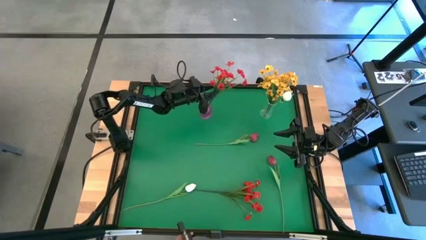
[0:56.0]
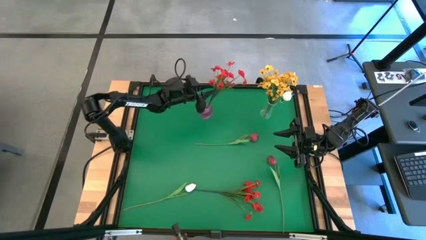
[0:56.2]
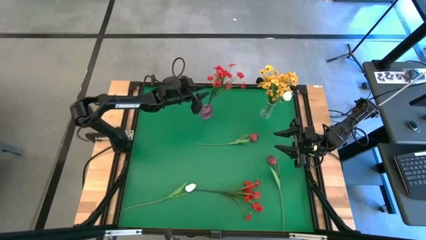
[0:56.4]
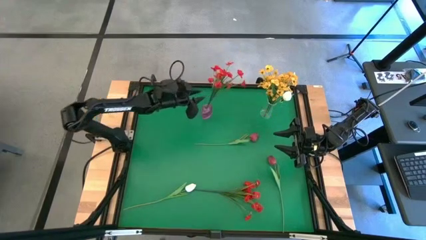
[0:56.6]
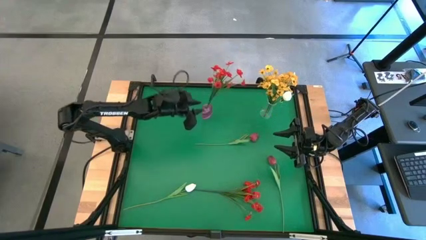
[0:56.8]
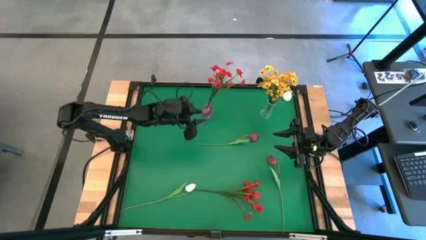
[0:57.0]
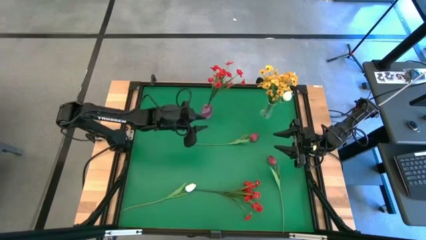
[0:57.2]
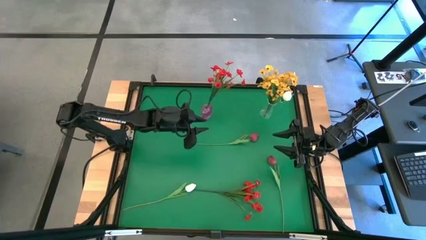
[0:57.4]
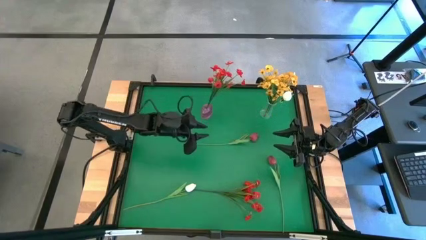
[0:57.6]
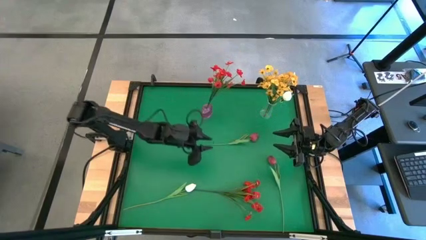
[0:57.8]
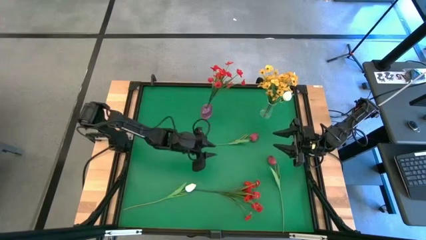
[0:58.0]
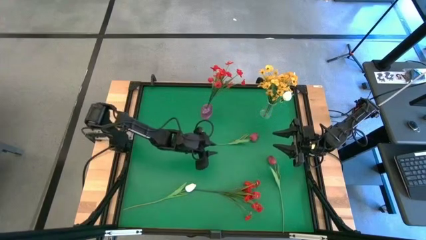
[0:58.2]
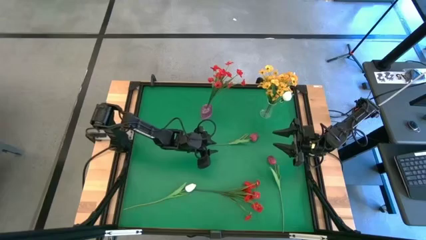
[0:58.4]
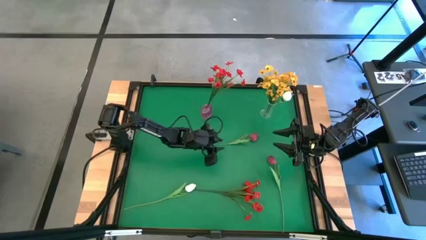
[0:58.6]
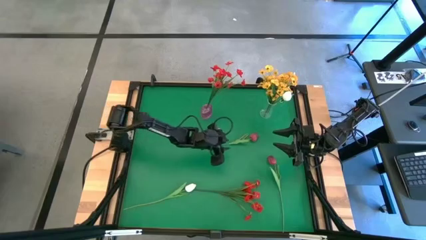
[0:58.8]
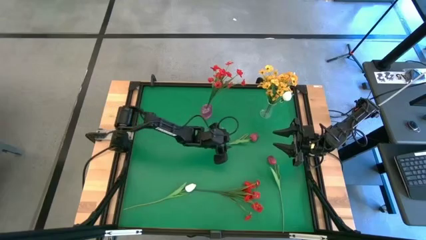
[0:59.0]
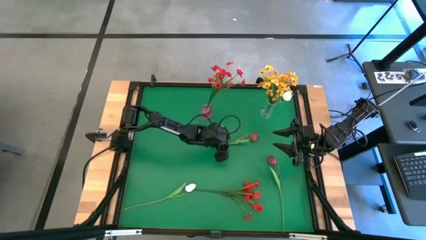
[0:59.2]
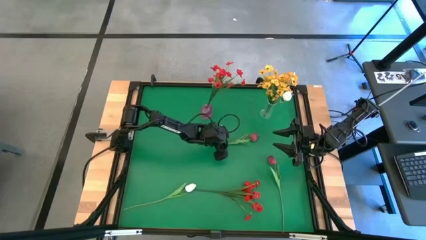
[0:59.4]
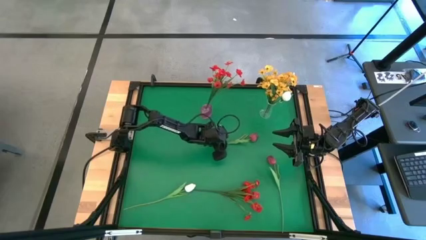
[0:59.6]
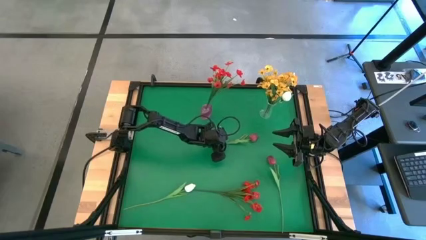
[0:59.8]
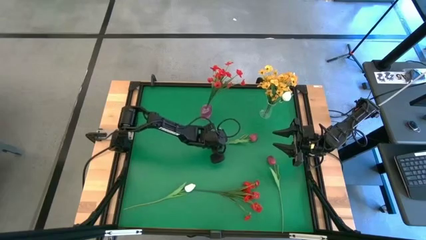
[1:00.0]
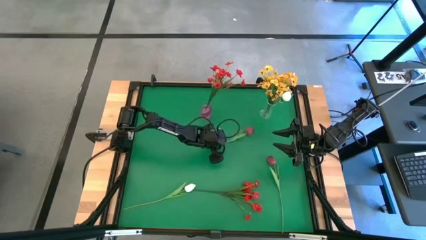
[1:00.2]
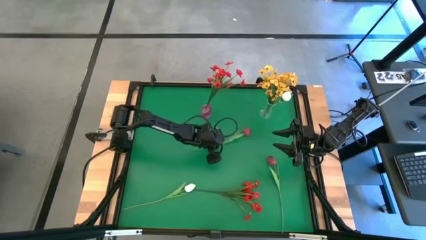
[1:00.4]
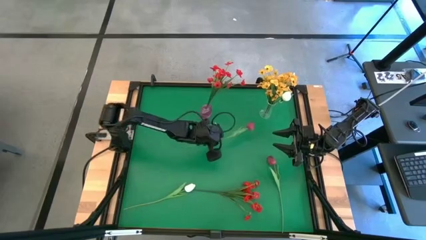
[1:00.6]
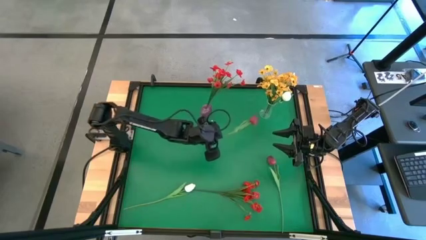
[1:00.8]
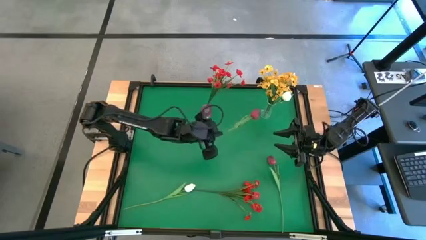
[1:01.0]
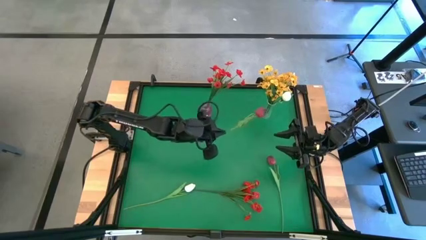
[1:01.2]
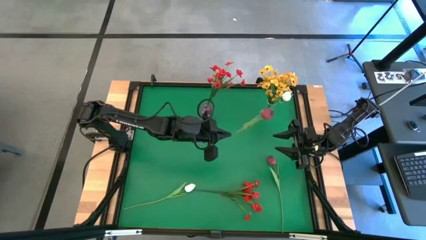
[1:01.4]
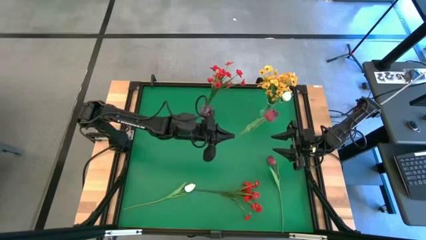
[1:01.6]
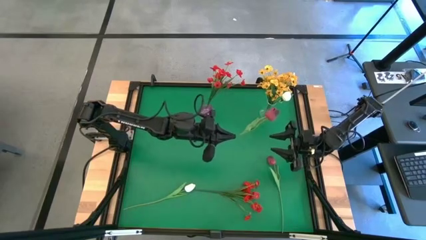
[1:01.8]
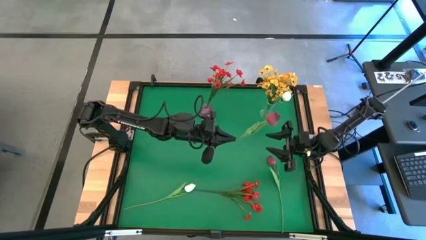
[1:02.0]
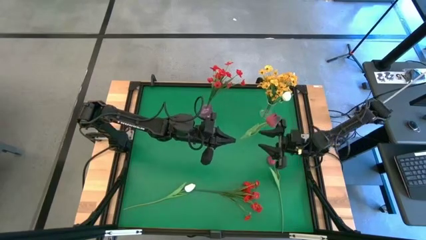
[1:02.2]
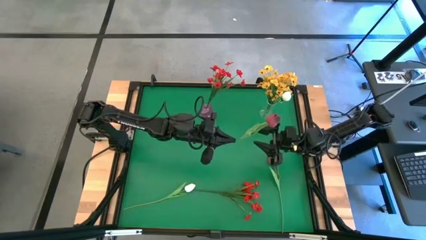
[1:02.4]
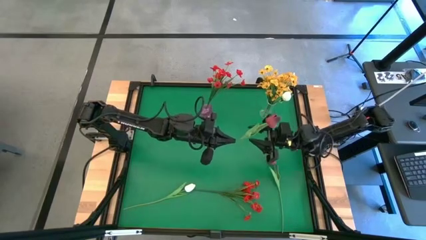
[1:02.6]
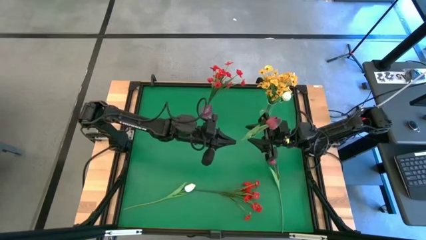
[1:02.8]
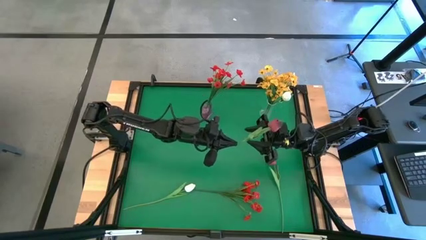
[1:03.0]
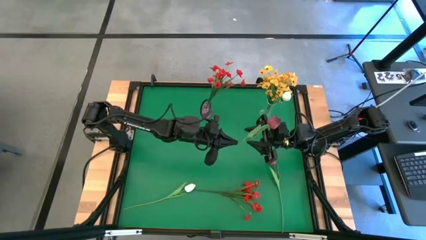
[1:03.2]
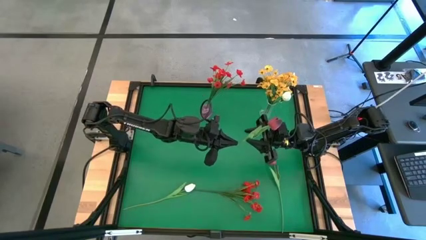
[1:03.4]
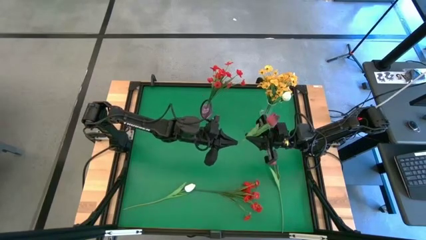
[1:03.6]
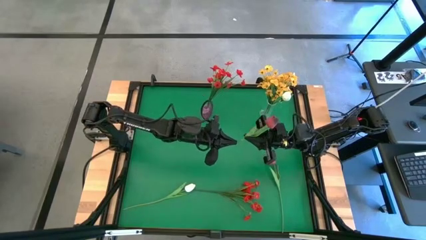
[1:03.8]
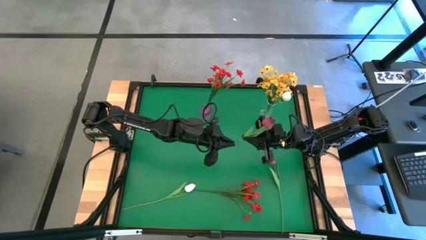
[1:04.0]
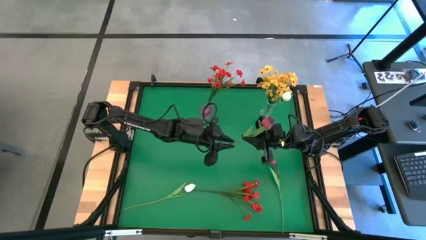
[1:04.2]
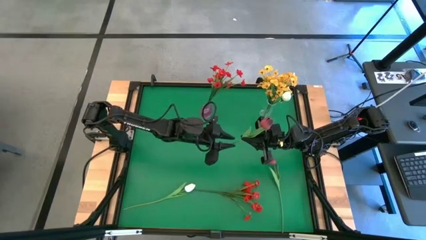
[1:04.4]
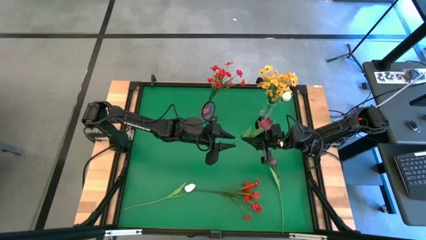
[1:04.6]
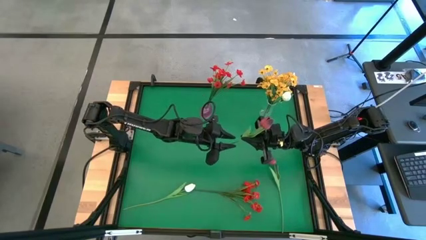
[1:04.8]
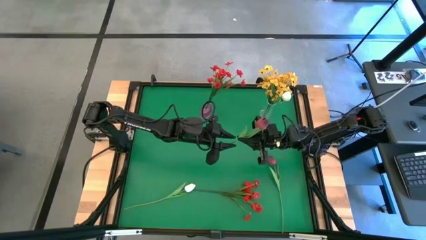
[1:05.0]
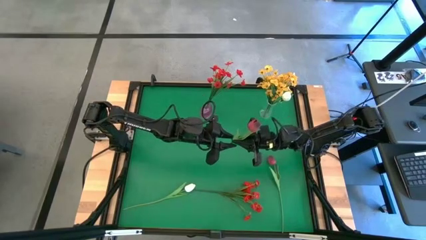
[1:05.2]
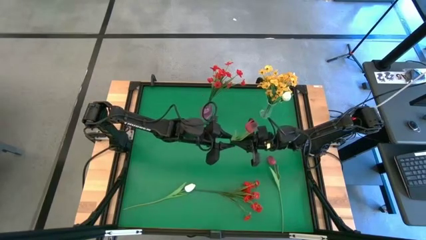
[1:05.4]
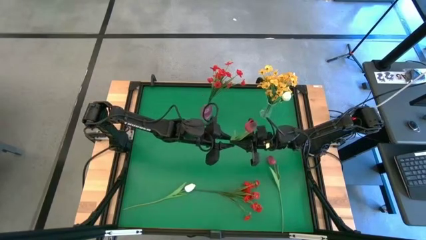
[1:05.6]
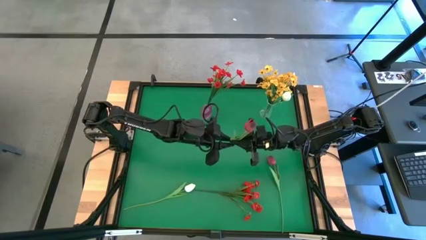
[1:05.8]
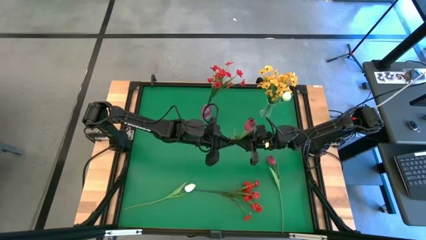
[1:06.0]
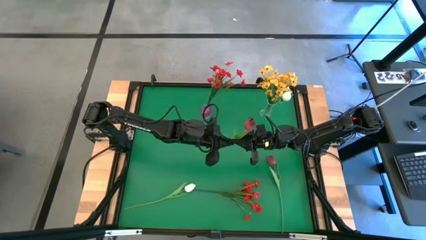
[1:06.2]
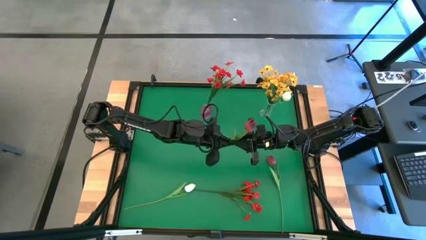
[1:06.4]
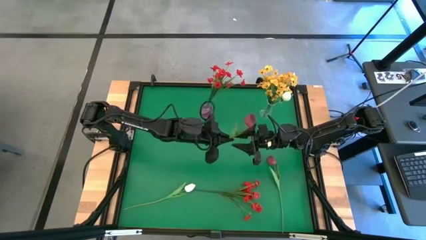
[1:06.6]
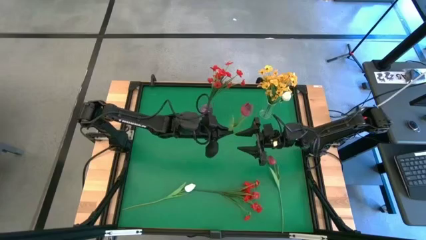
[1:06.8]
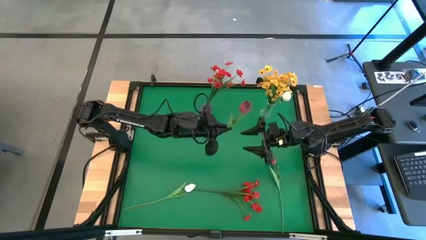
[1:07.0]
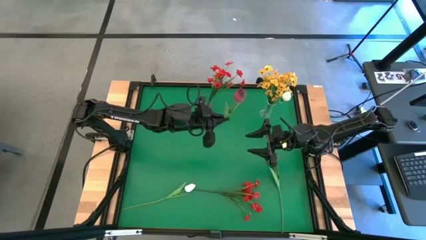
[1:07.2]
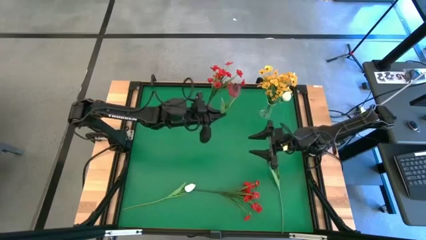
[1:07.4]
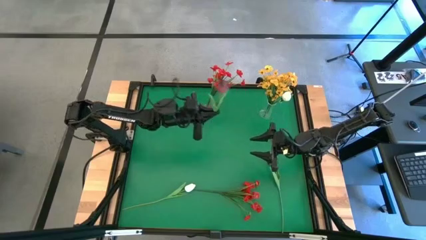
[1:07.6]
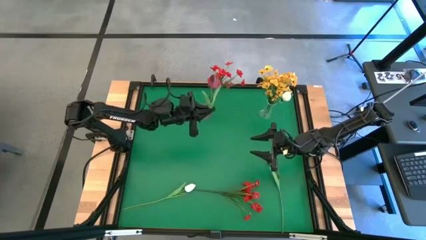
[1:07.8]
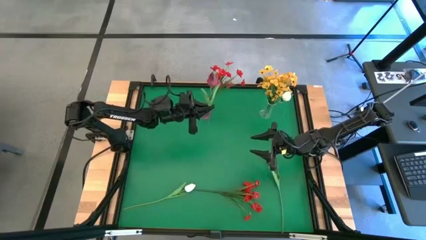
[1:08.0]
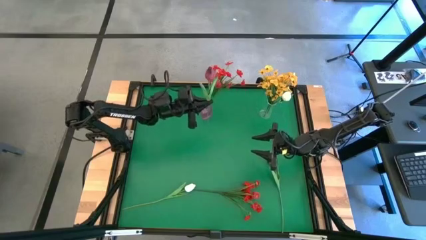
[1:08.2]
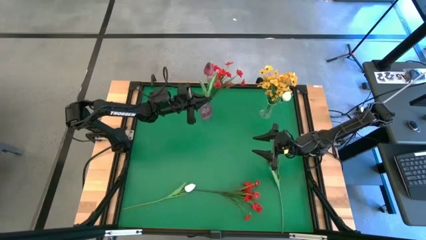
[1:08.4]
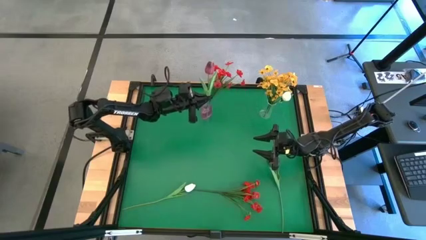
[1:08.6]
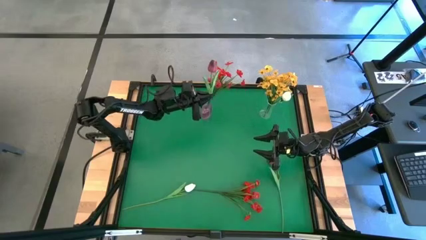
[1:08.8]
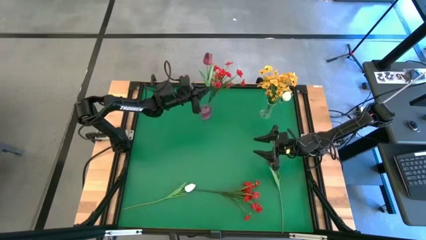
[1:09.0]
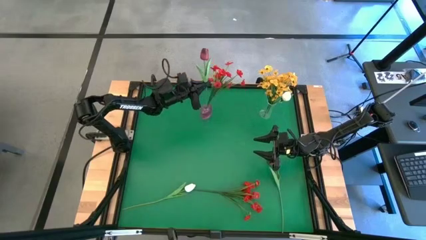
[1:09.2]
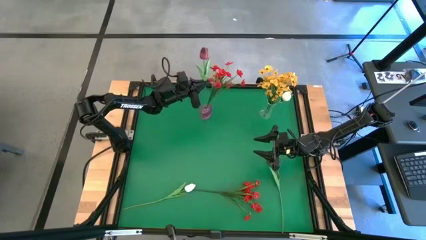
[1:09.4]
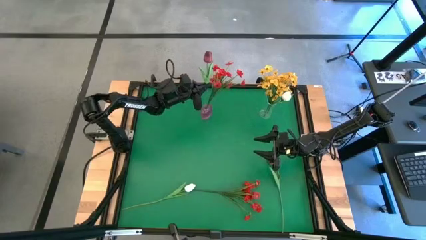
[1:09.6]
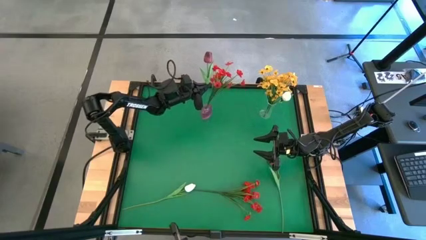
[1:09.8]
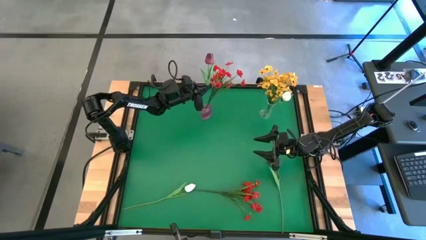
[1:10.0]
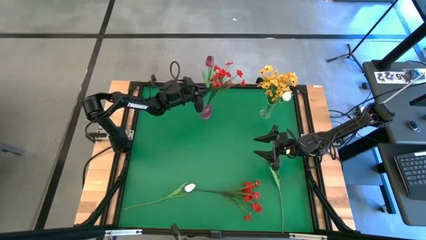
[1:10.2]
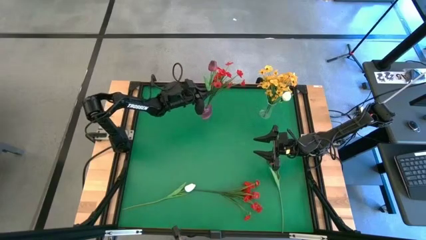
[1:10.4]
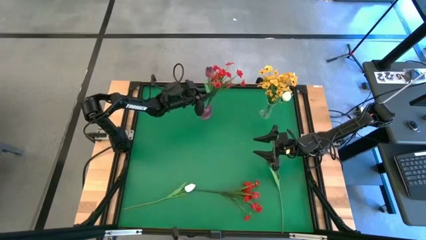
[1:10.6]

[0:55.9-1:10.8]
Task: Sort flowers into vase by color
Put the top pink flower into the pink vase
